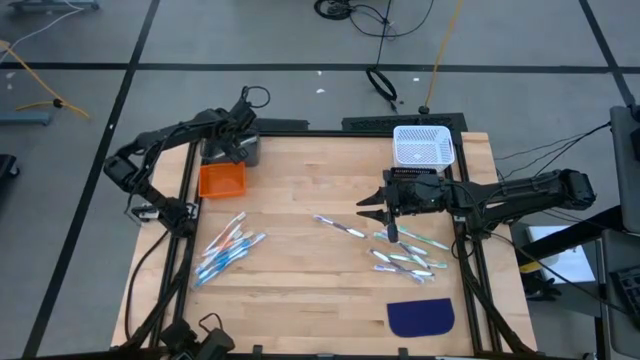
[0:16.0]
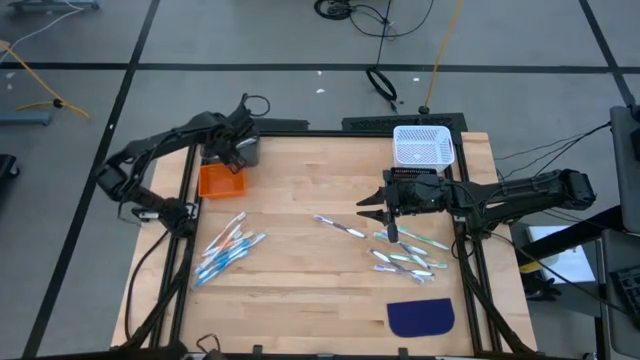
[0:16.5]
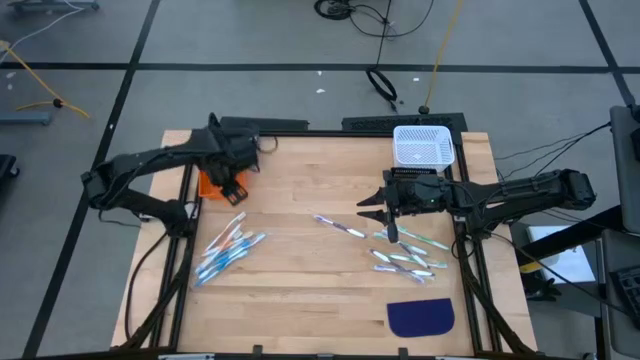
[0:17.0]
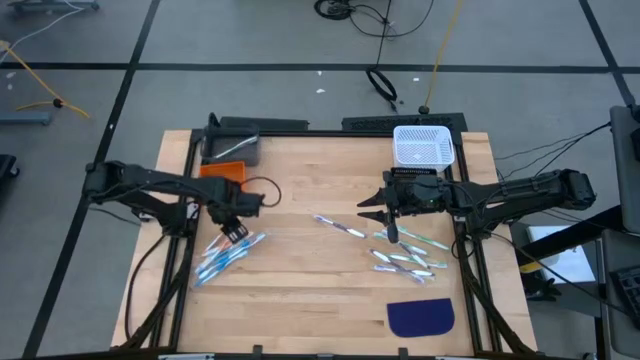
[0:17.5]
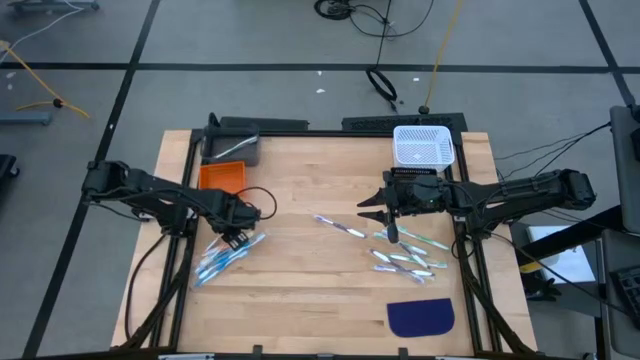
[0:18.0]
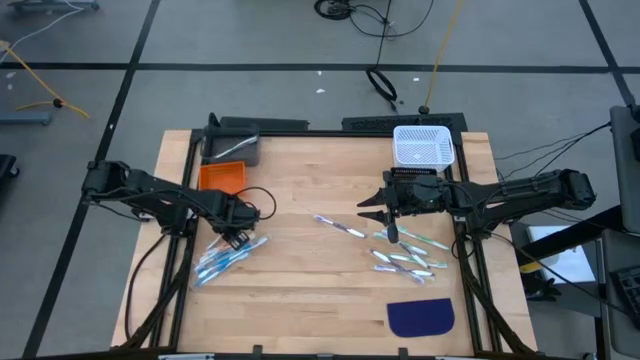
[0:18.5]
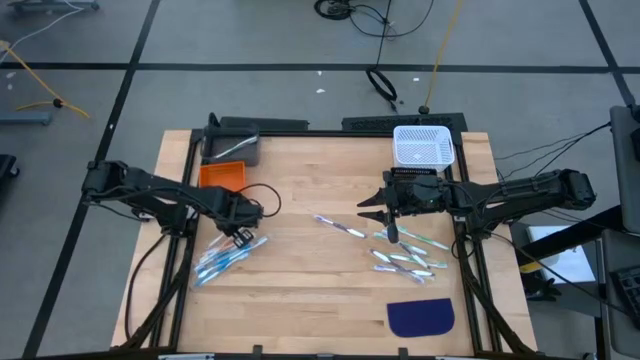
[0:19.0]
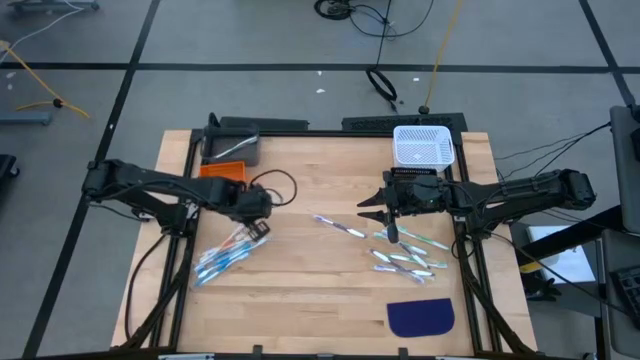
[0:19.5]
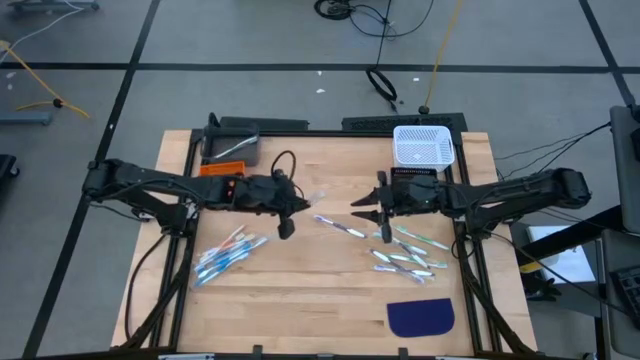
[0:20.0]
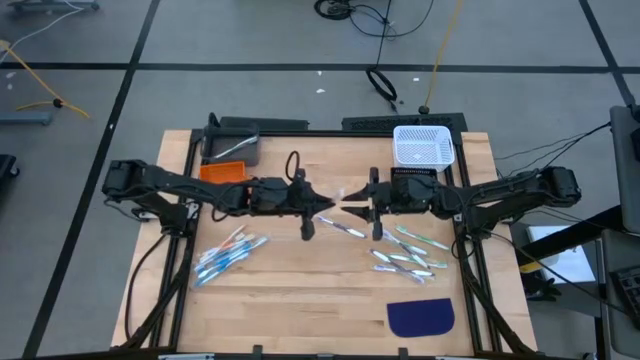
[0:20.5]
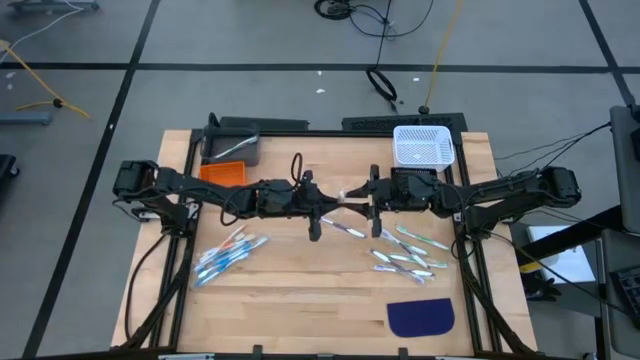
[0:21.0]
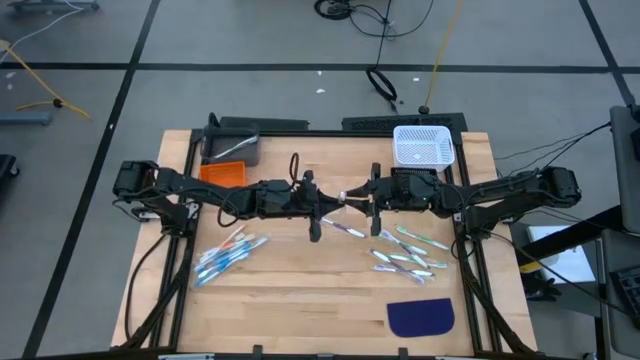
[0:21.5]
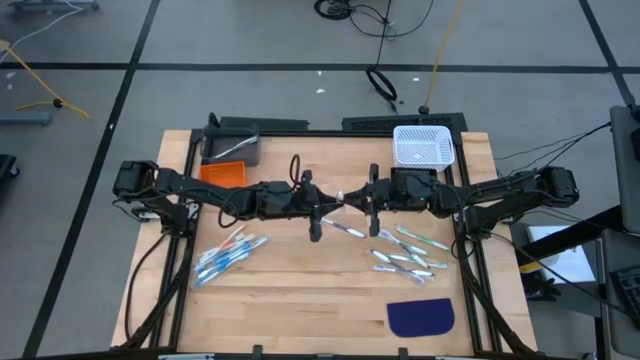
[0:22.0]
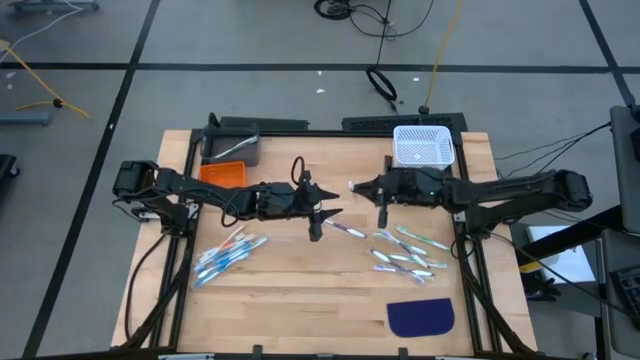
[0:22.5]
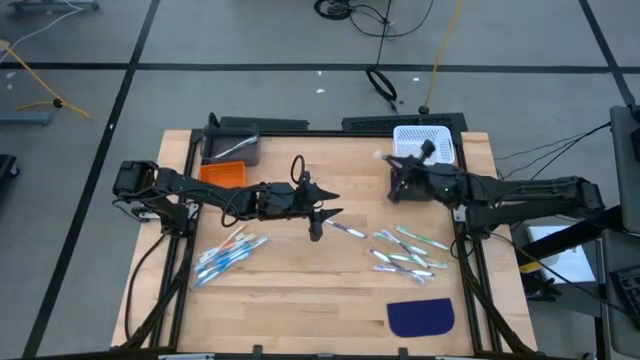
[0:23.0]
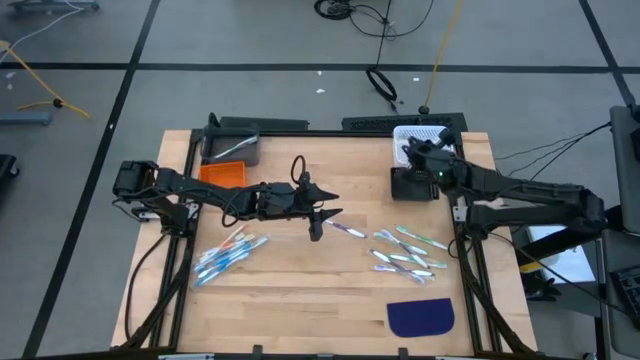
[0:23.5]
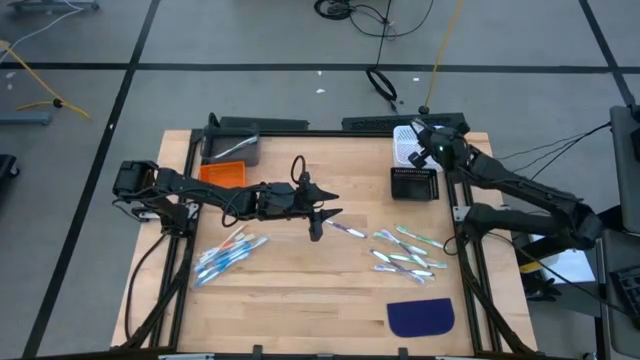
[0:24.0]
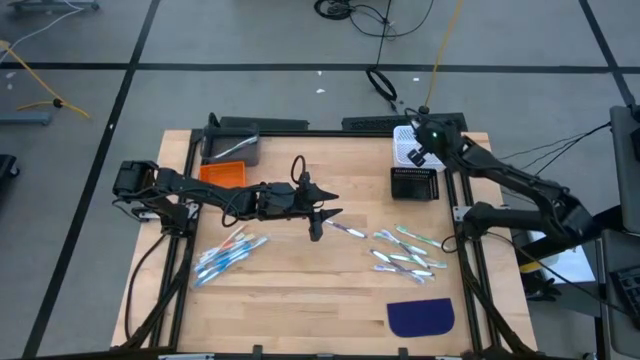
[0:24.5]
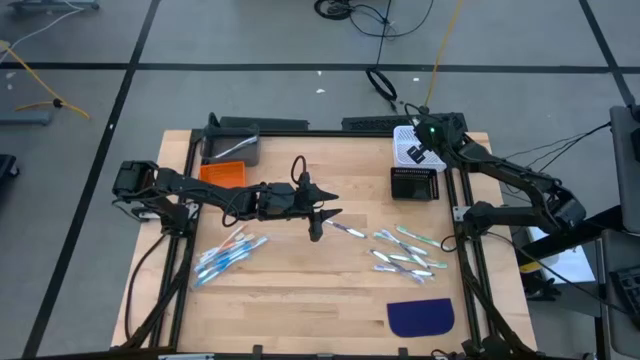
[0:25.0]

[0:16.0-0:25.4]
Task: Pick & Place Toothbrushes
Put the orange toothbrush into the white bin

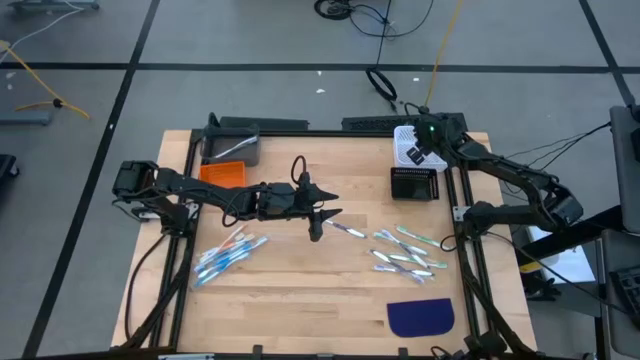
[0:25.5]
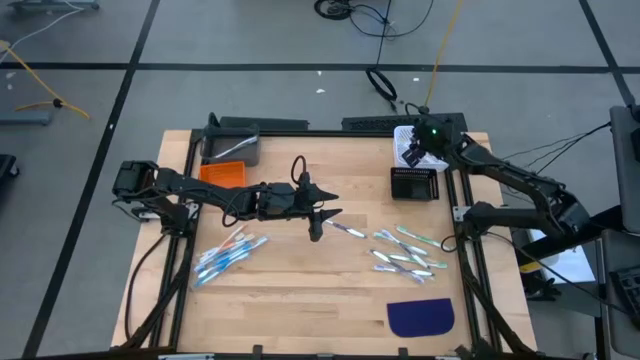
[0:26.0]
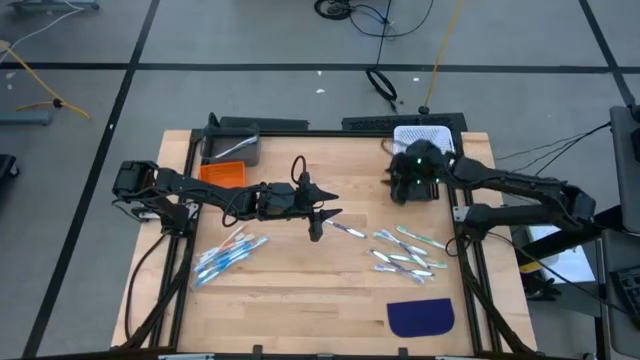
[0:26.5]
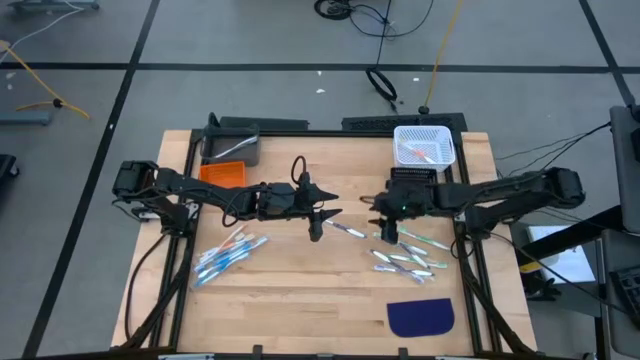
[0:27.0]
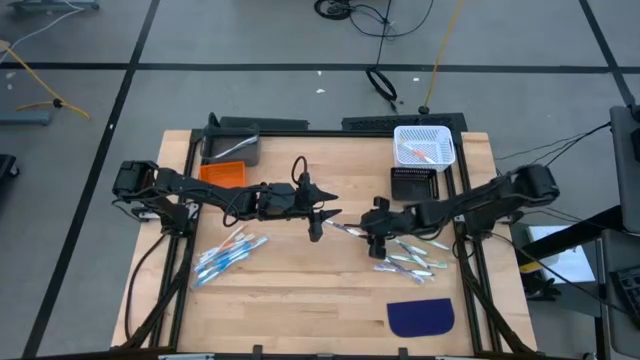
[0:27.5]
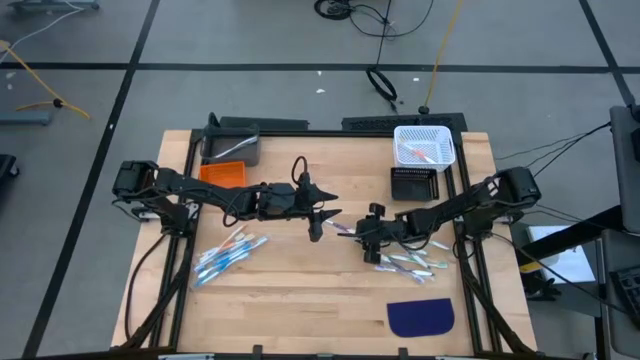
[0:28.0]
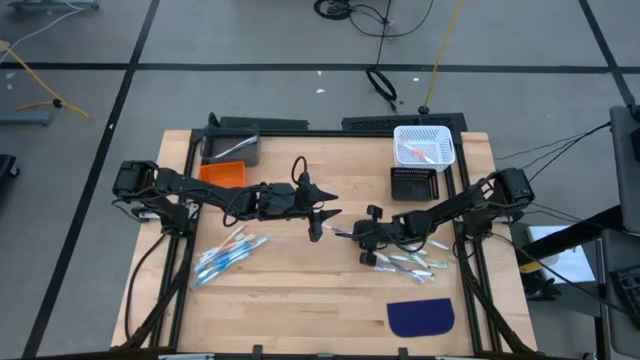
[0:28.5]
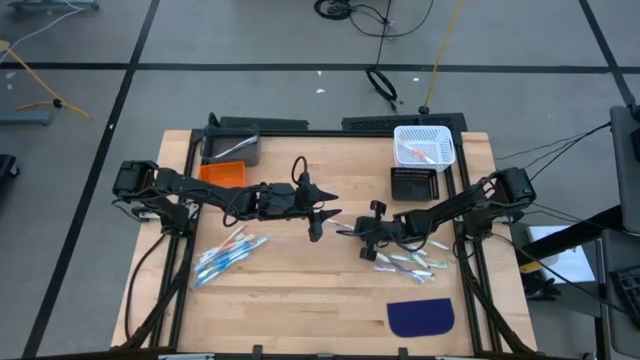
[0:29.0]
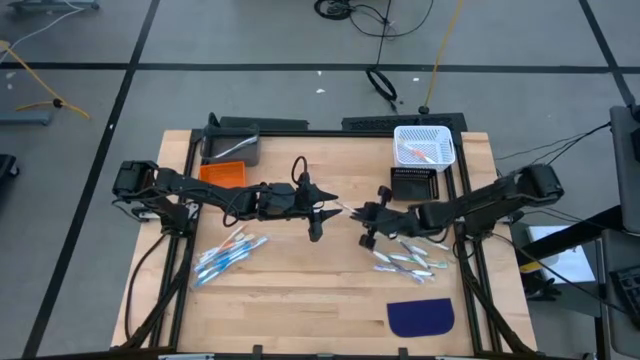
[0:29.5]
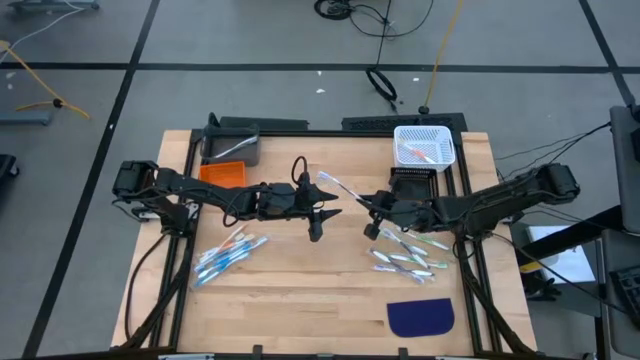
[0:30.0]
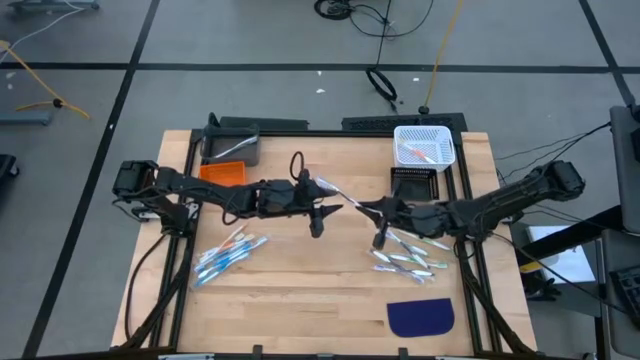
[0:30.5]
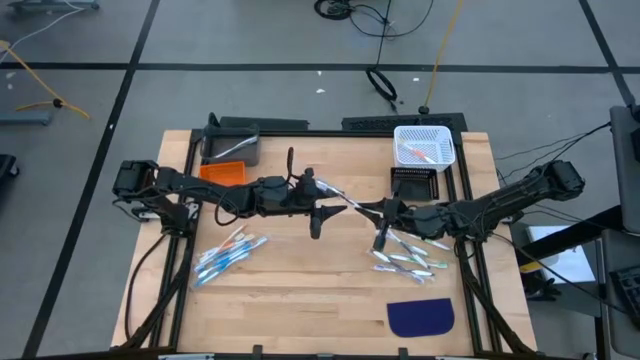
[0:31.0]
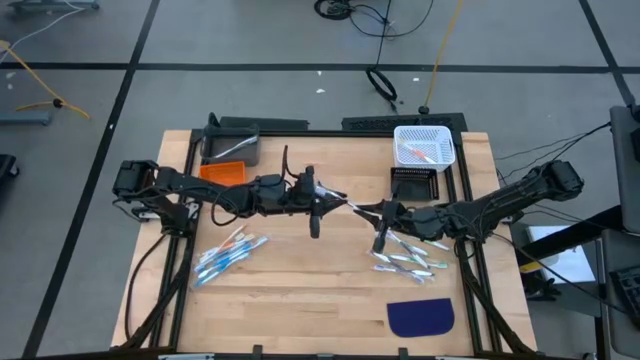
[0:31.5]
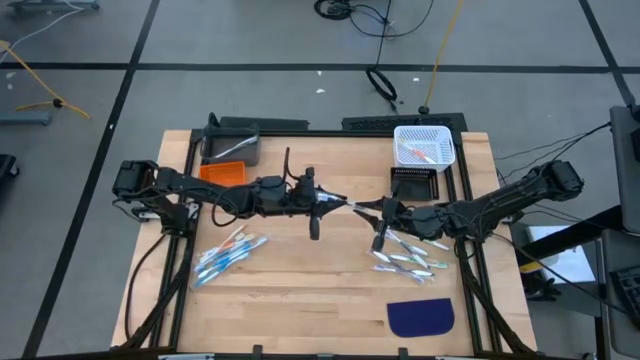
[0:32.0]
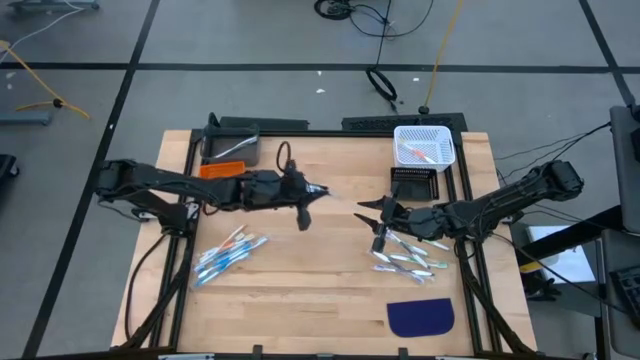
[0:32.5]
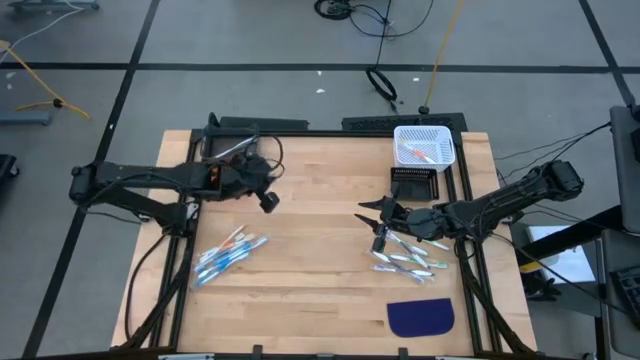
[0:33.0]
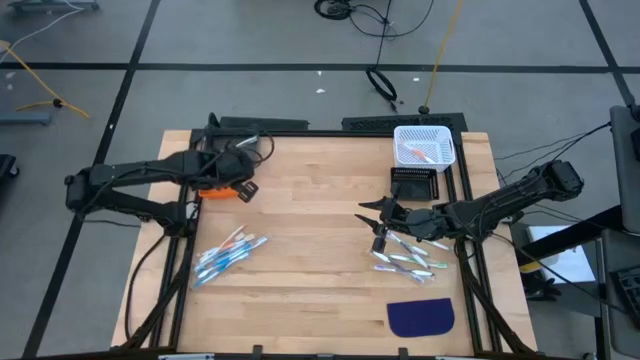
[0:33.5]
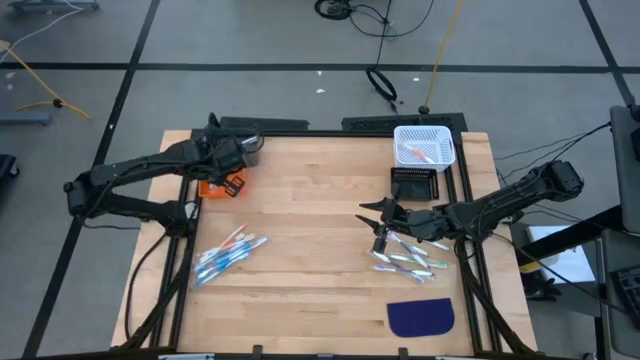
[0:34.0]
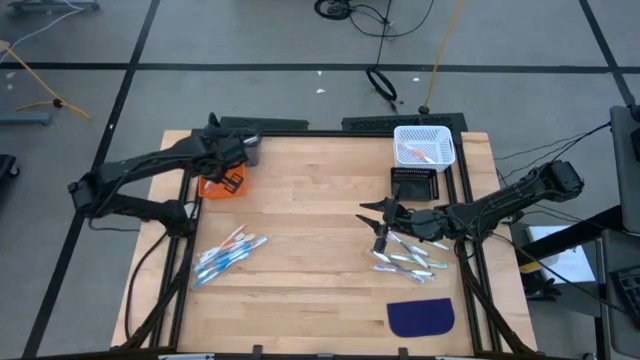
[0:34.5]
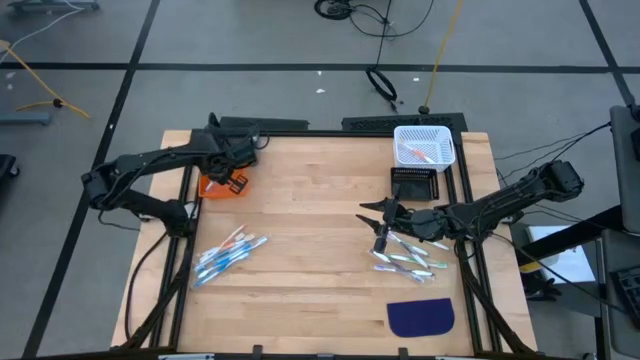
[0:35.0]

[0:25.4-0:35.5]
Put the purple toothbrush in the orange bin

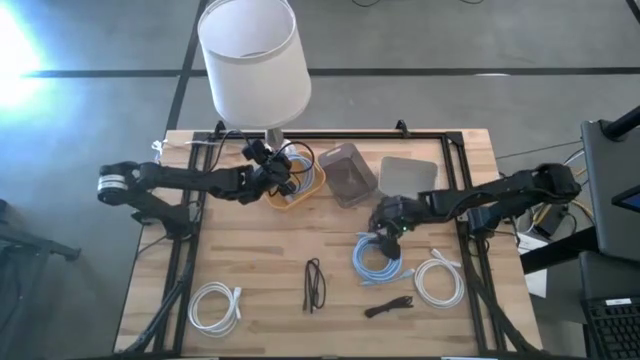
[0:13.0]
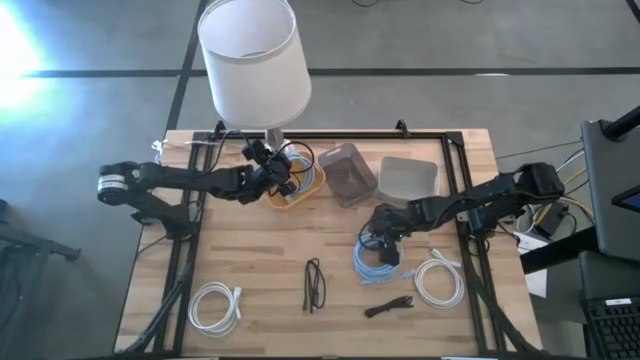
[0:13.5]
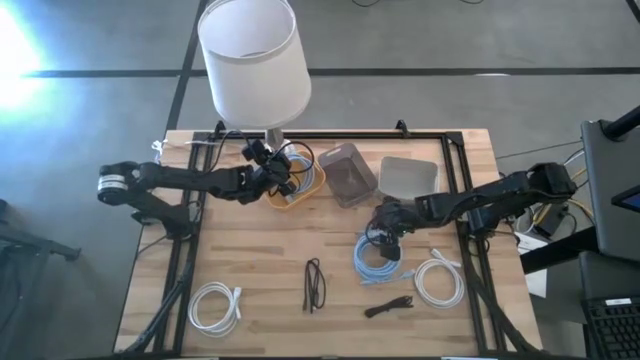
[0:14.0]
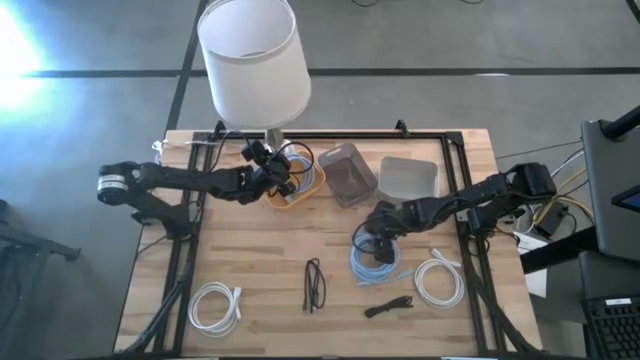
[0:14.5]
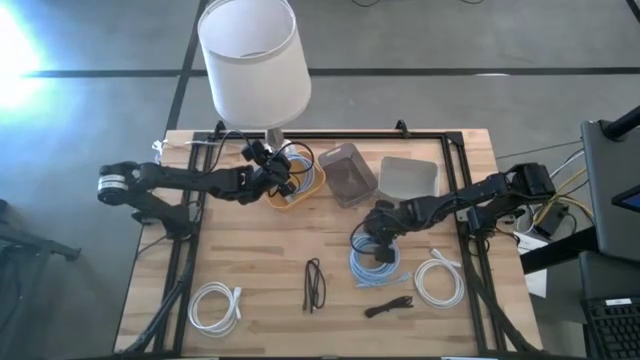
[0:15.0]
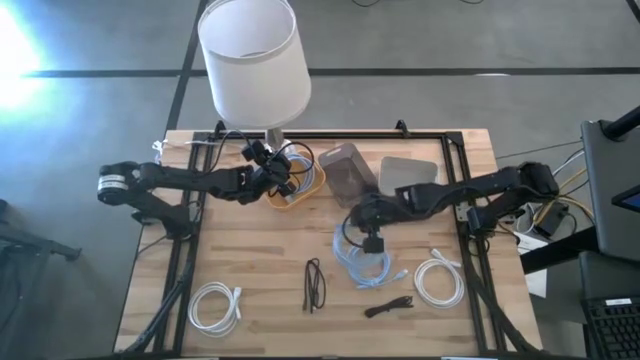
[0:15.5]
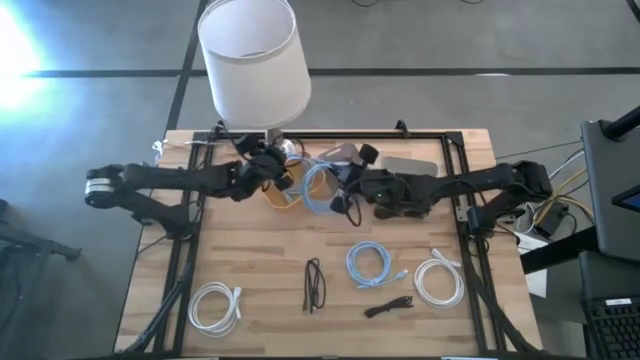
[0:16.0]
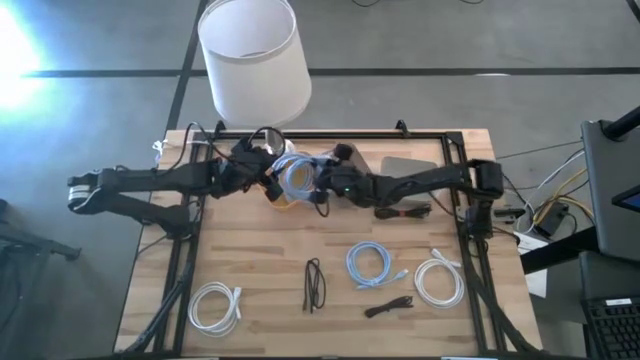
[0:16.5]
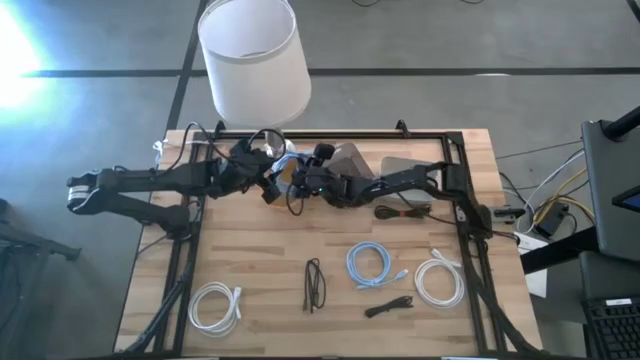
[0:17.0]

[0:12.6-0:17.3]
Task: Pick & Place USB Port
Put the blue charger cable into the orange bin
